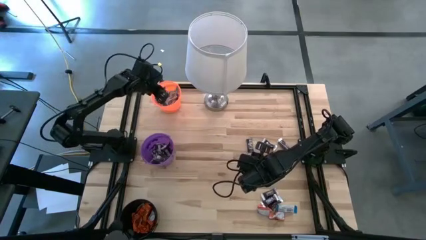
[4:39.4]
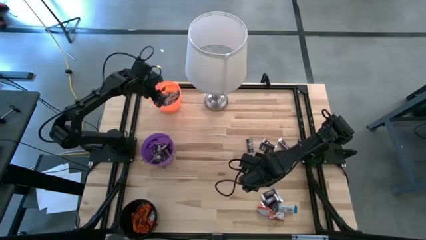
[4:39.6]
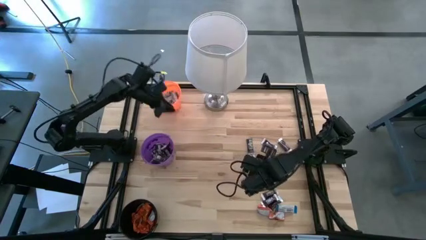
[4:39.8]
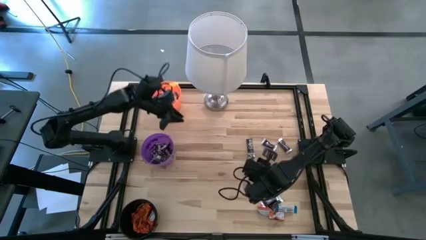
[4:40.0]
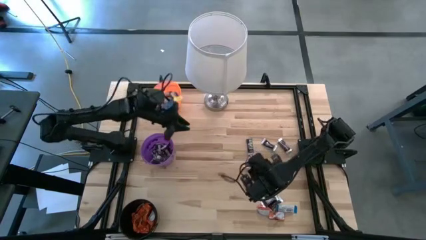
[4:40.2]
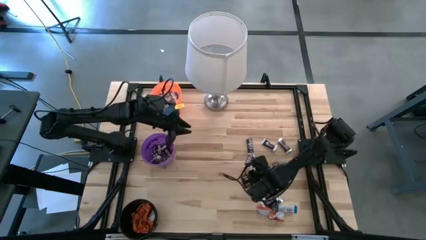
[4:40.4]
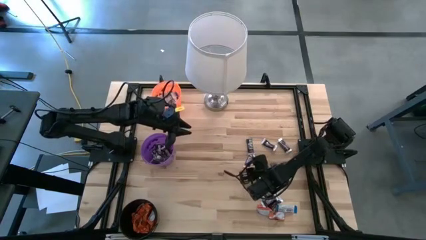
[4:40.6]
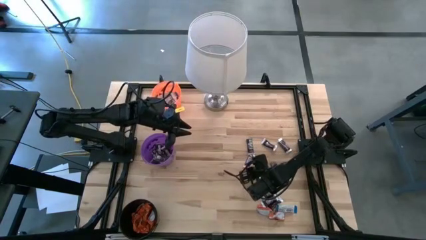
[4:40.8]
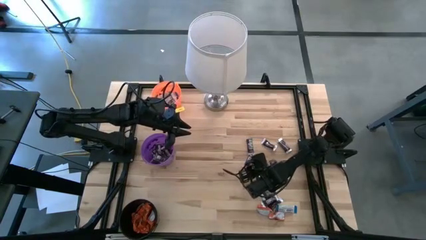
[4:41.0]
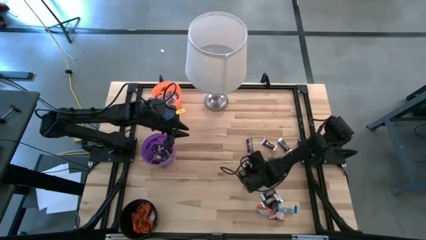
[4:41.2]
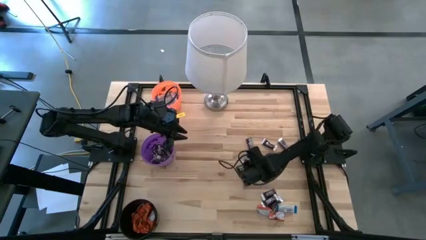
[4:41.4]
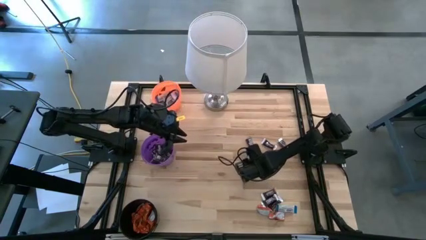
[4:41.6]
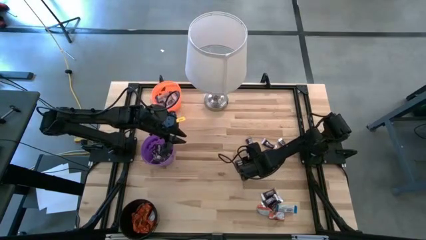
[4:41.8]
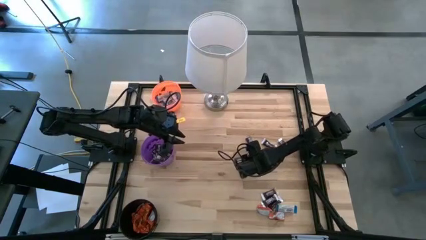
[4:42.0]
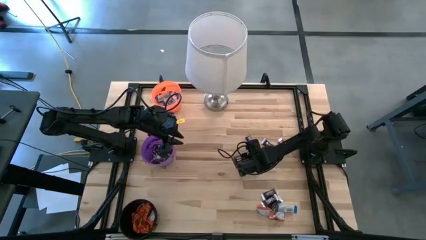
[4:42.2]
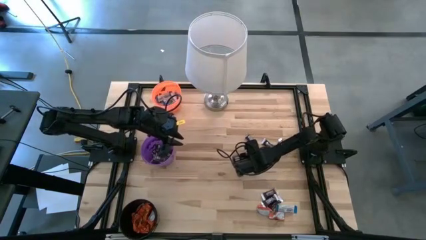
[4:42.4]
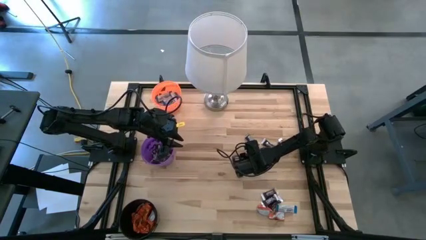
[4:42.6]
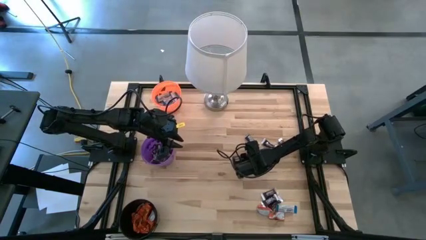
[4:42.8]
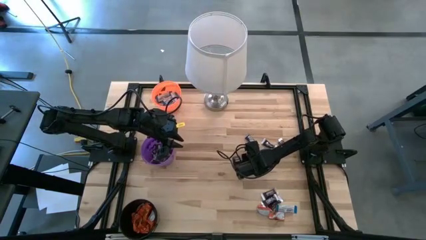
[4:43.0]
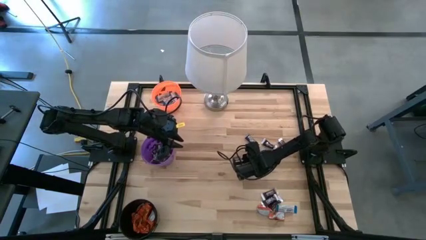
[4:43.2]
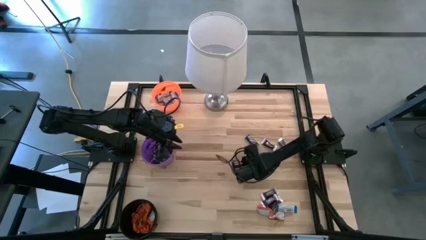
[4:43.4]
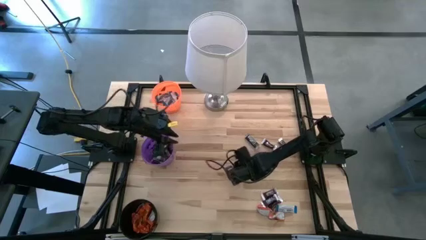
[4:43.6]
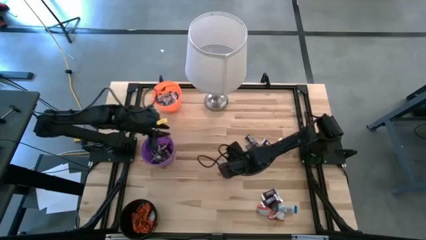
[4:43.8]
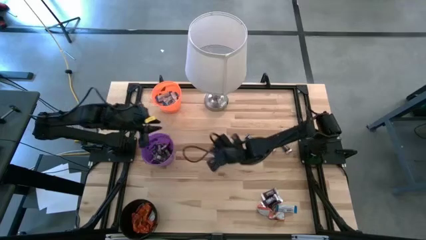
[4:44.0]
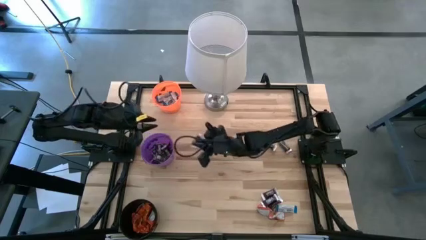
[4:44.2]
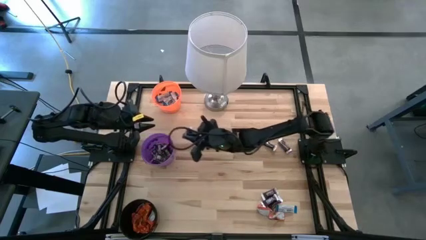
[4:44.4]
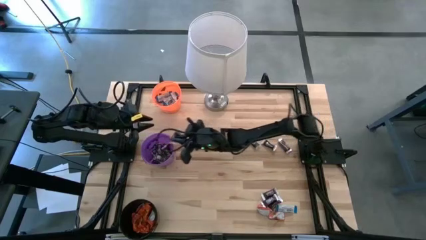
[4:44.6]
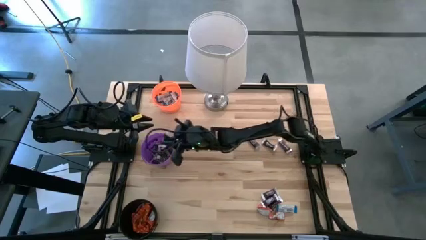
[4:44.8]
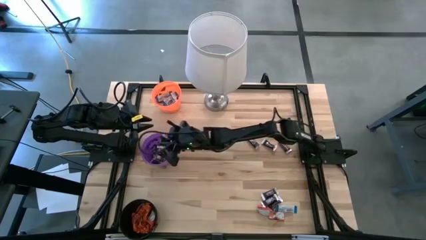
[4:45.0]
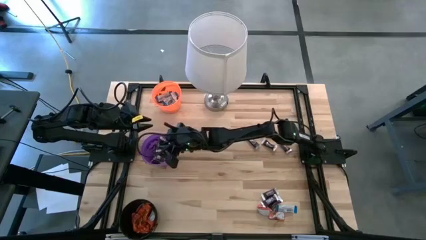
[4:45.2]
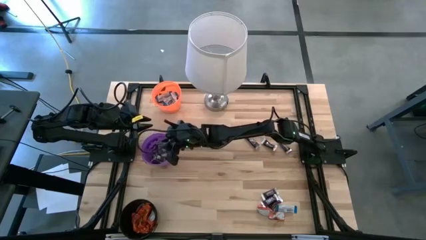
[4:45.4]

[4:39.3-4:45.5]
Task: Sort candy
Put the brown chocolate into the purple bucket

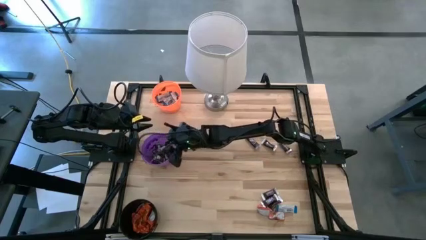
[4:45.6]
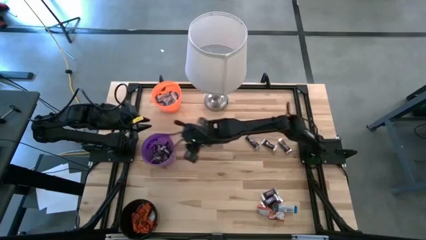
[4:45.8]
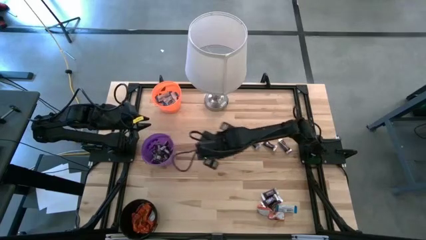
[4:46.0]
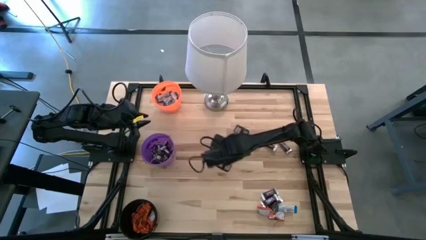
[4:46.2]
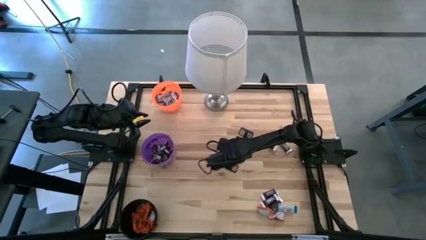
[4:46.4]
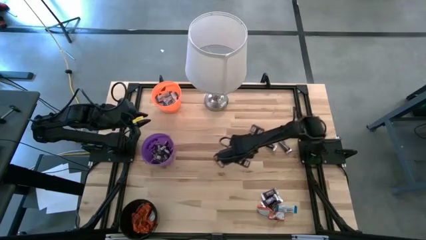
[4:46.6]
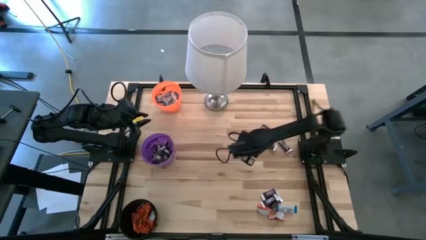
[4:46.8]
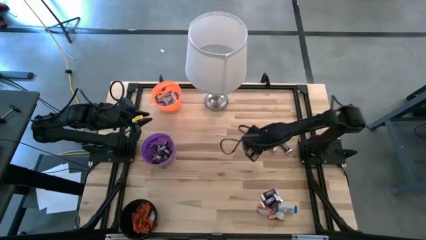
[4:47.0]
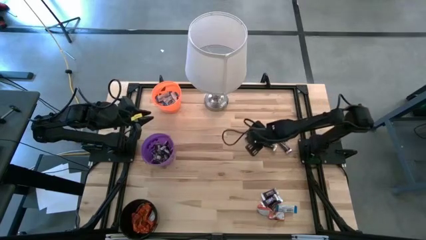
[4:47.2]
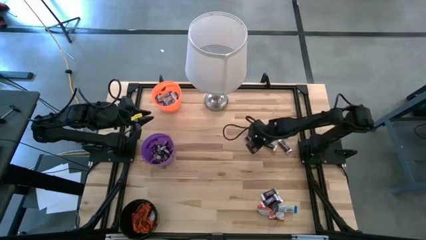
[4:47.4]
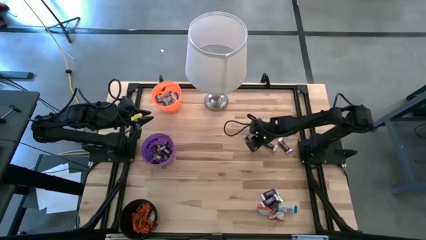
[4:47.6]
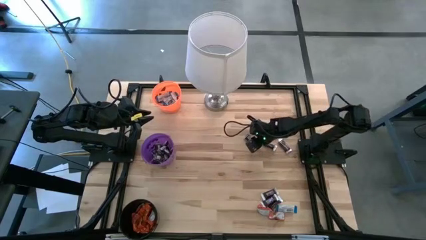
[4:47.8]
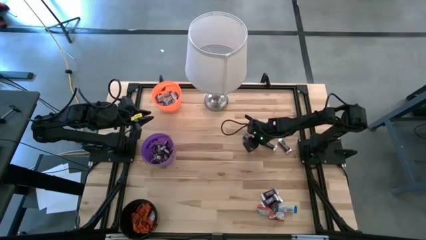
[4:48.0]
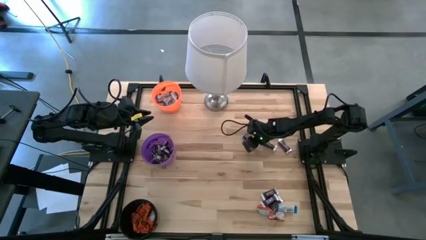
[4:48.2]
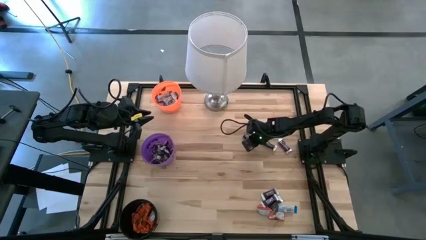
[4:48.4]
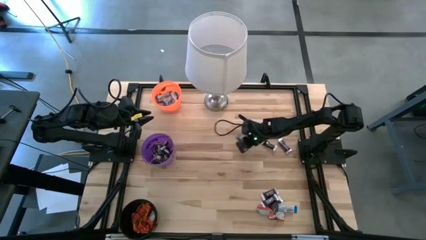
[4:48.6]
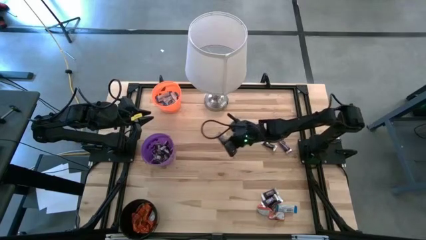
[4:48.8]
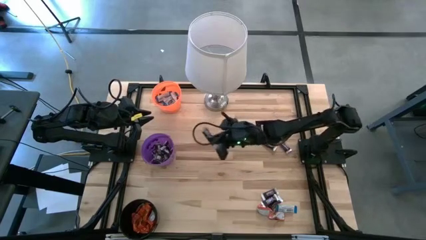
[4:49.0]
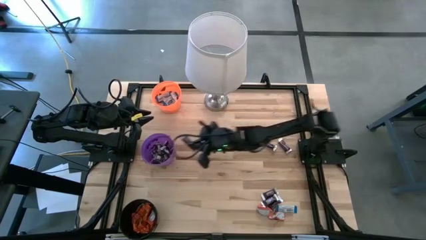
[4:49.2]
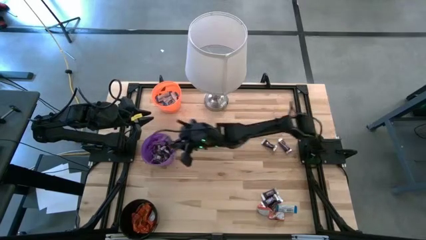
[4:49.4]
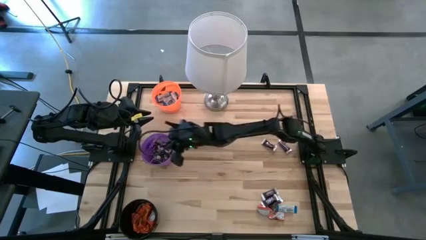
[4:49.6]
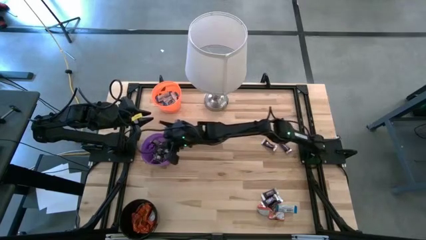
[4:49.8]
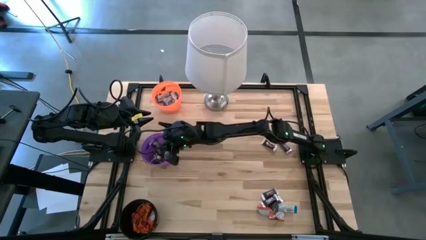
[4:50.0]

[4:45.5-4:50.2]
Put the brown chocolate into the purple bucket

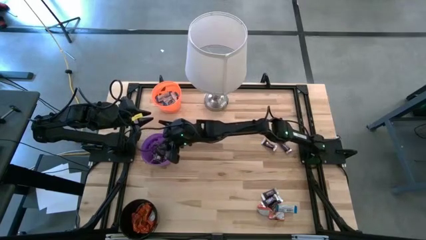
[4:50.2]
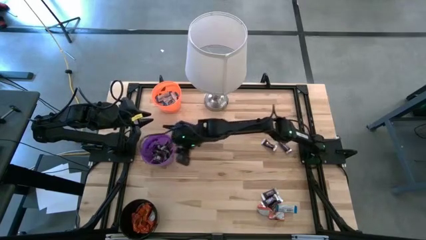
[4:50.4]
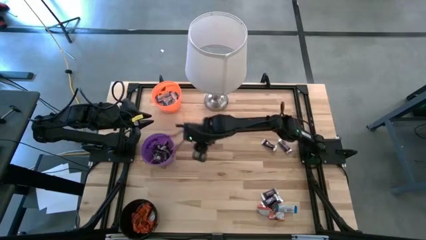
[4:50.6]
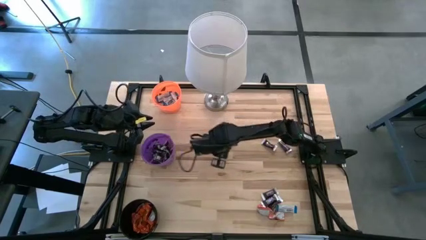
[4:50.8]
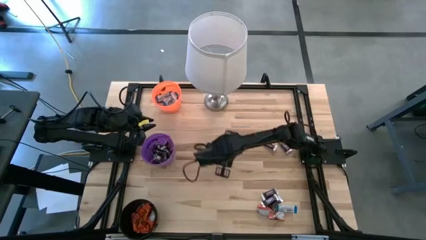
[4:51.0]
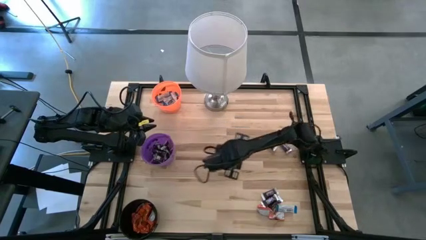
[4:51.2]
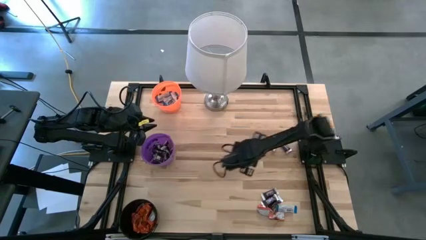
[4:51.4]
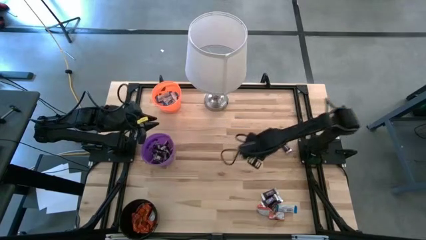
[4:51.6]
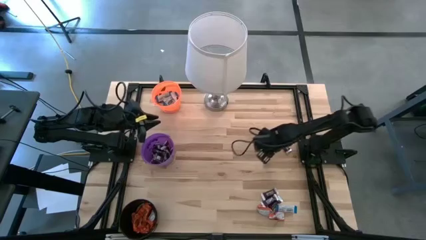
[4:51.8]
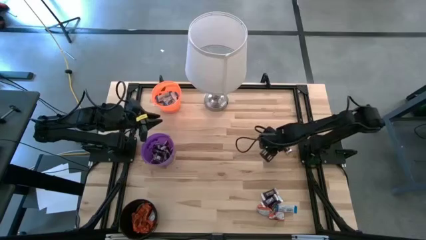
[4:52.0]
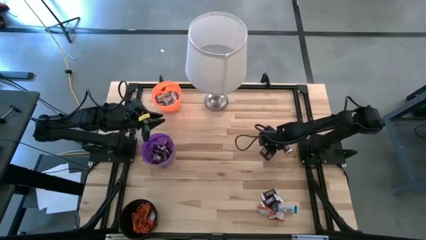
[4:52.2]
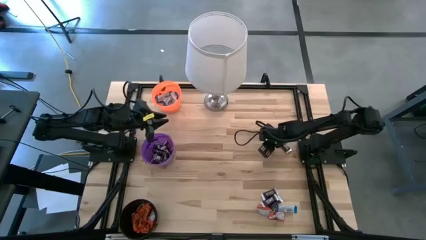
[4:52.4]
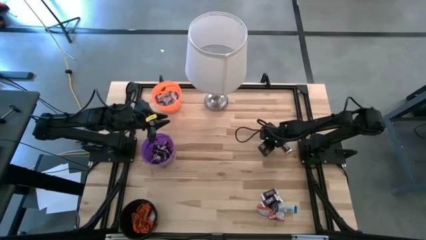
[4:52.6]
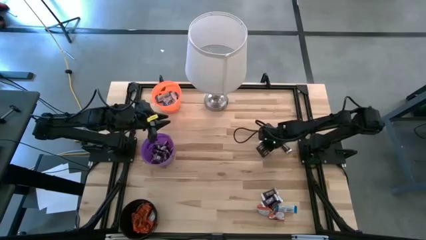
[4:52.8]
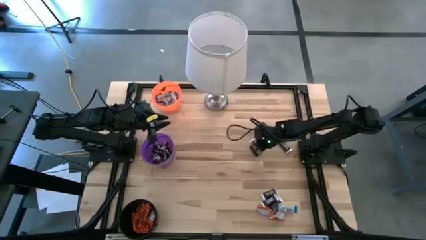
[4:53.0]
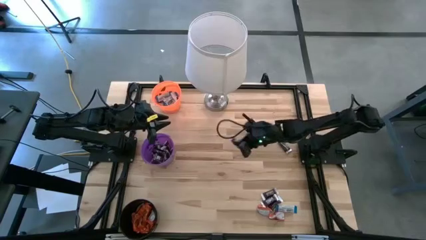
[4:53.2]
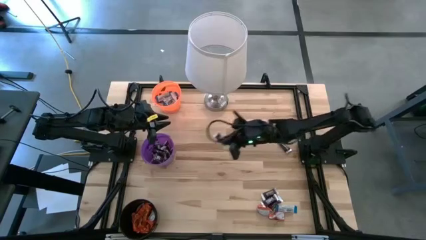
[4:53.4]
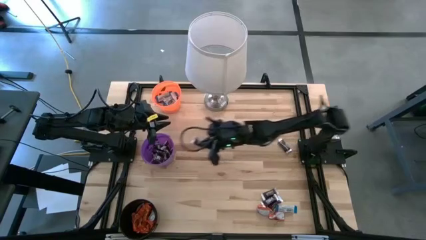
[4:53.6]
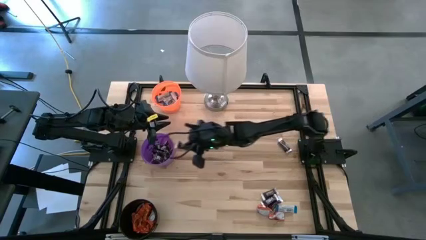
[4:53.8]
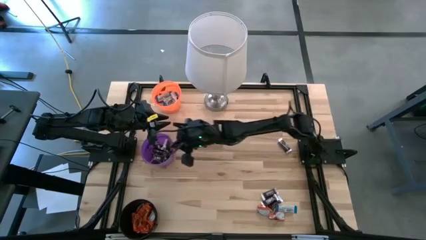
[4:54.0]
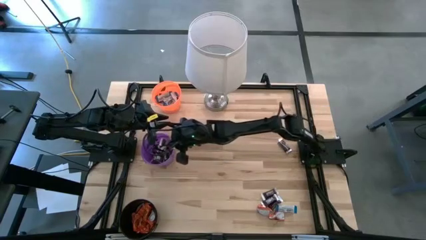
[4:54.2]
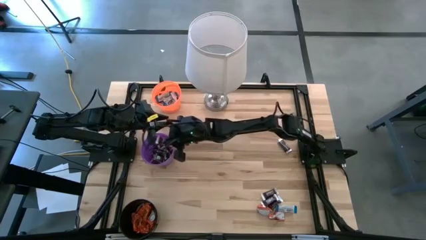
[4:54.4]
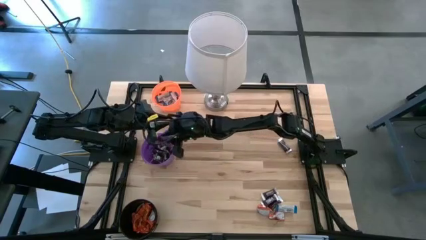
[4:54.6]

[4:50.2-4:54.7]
Put the brown chocolate into the purple bucket
